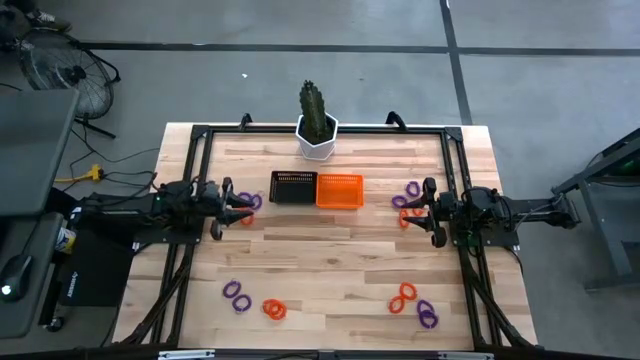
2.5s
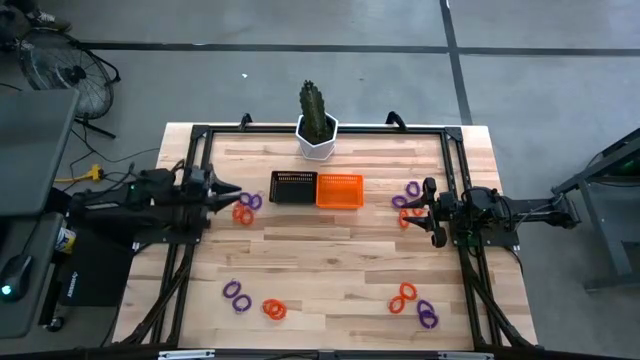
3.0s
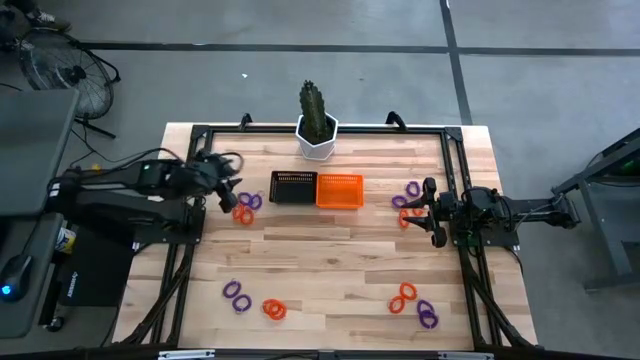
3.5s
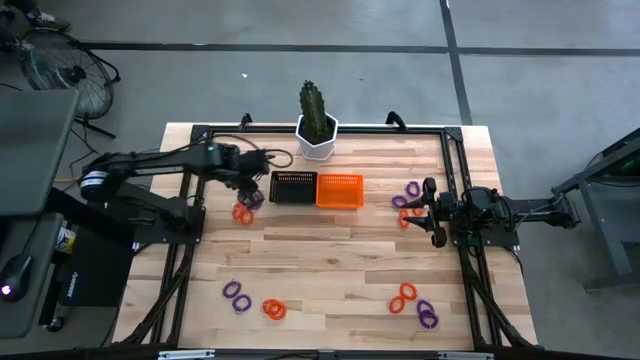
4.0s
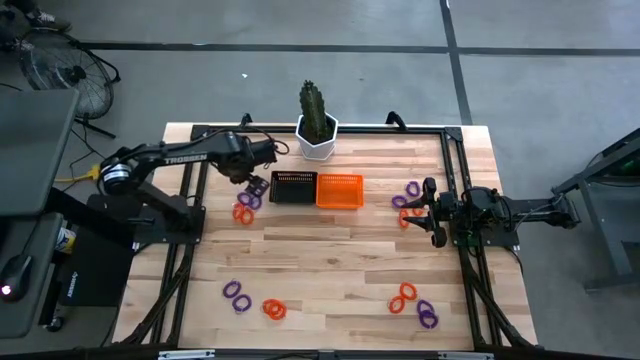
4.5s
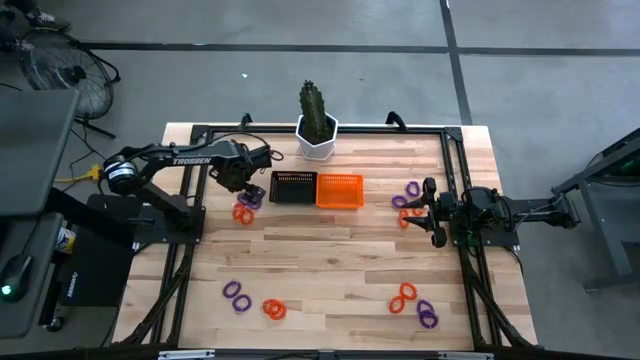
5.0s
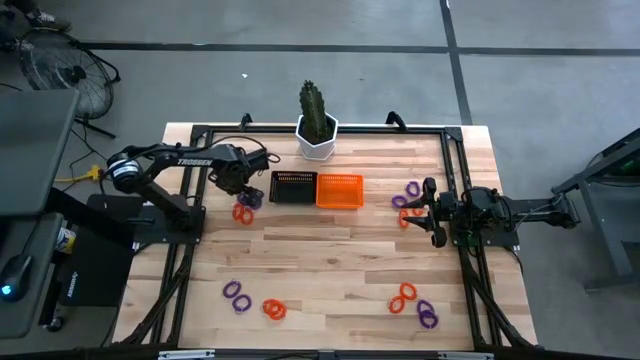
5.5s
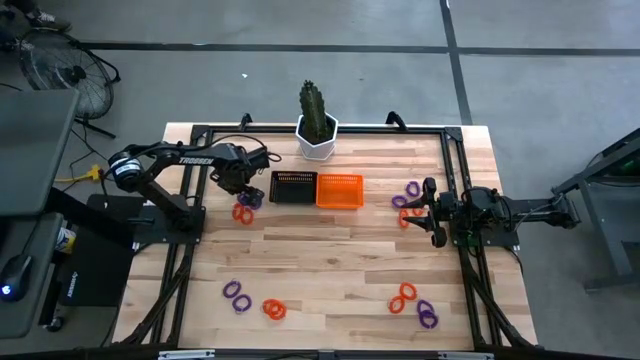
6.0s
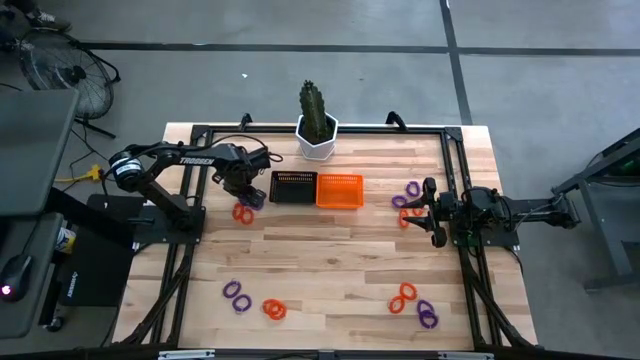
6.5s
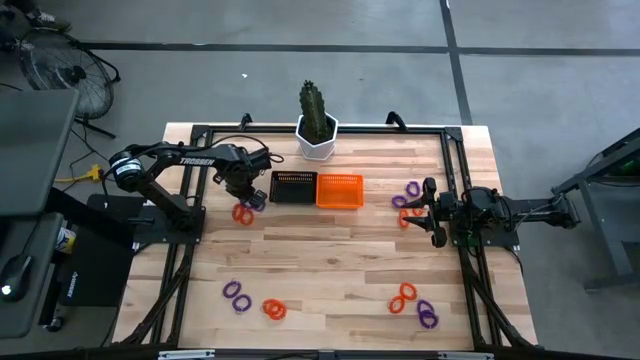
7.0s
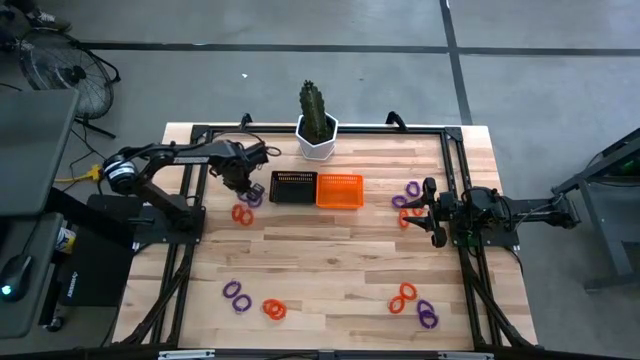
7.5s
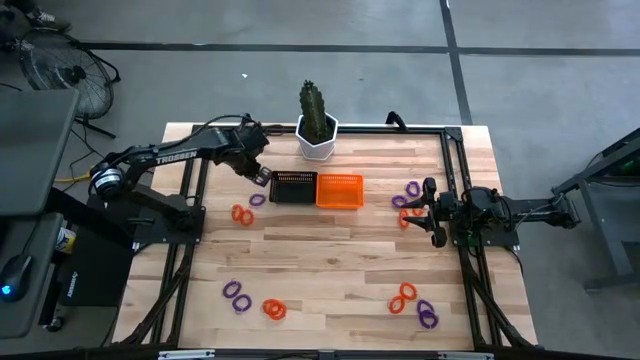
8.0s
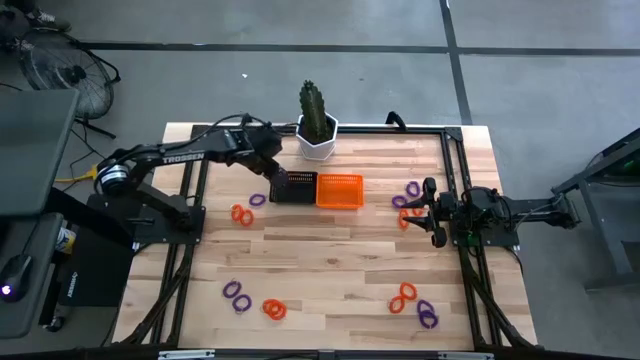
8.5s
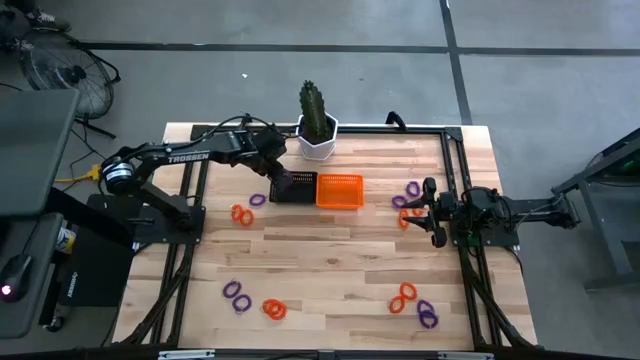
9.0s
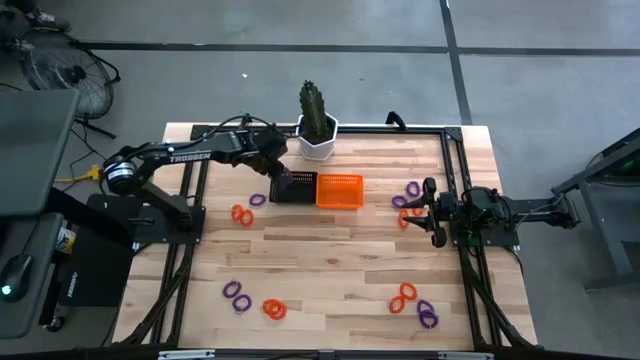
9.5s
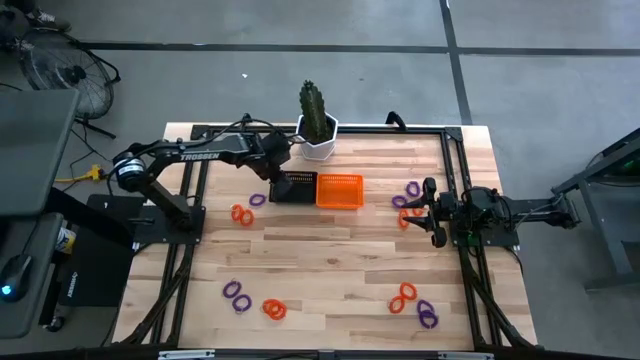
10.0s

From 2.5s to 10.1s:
Task: Sort spring keychains
Put the purple spring keychain in the black bin

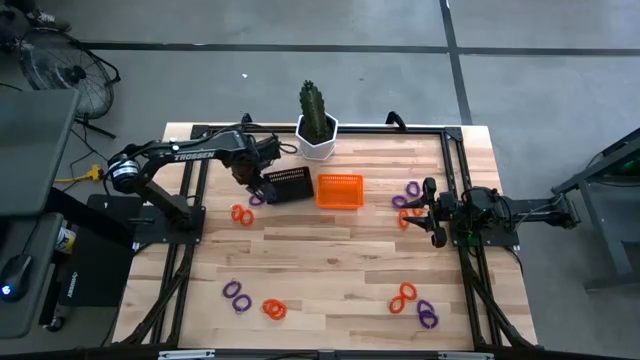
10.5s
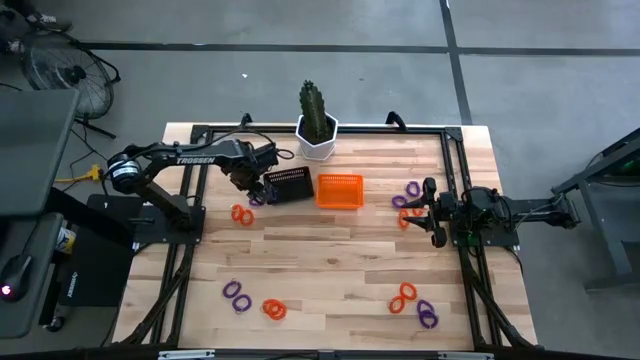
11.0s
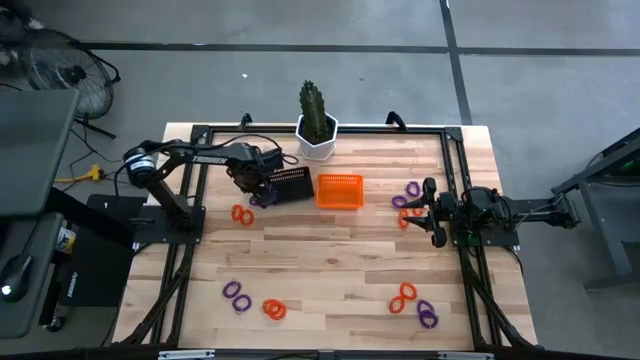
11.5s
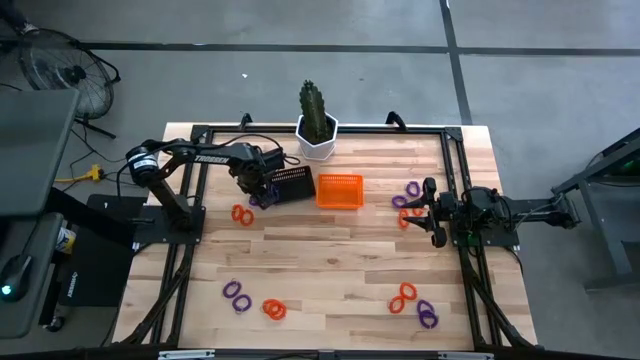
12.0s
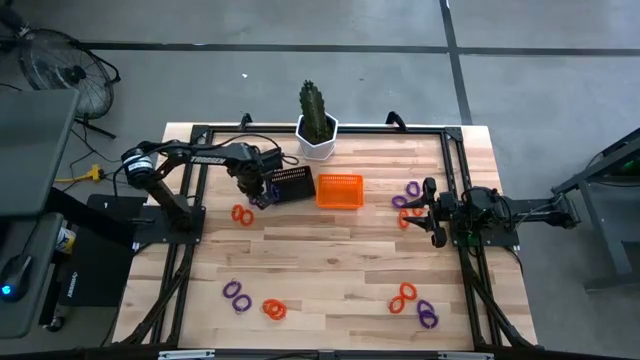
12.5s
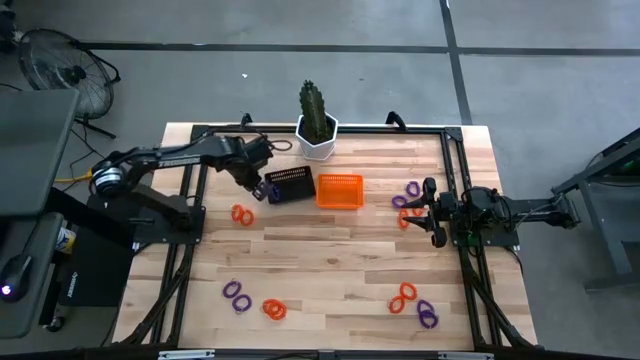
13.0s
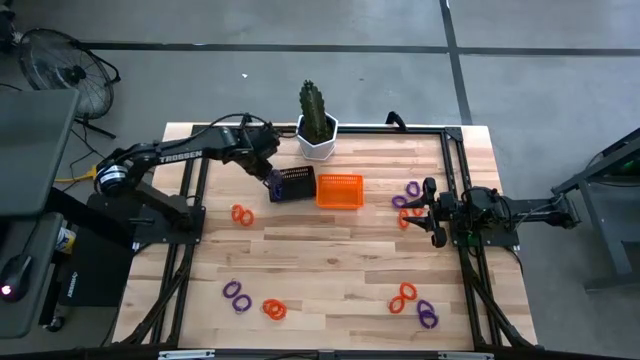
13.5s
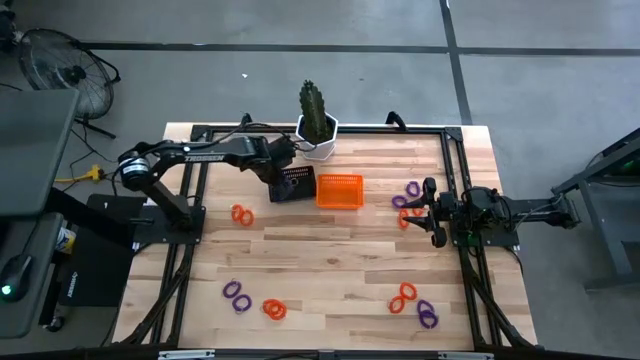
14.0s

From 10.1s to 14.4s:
Put the purple spring keychain in the black bin

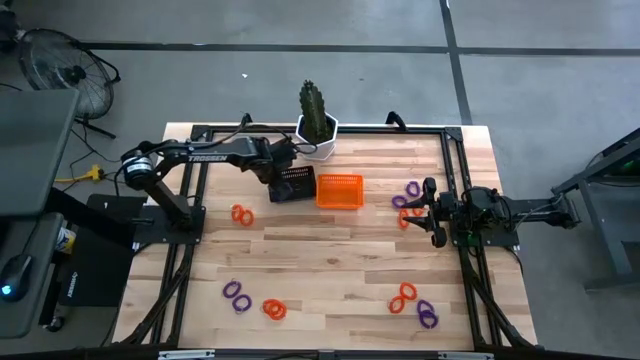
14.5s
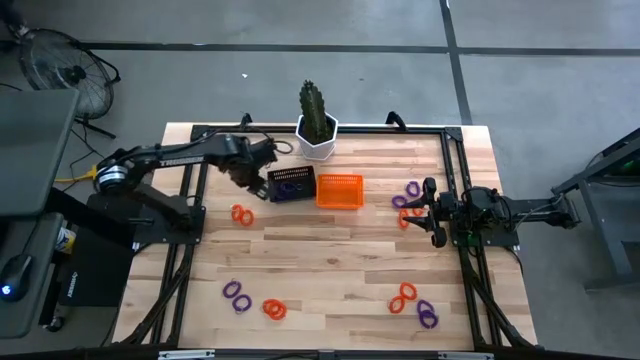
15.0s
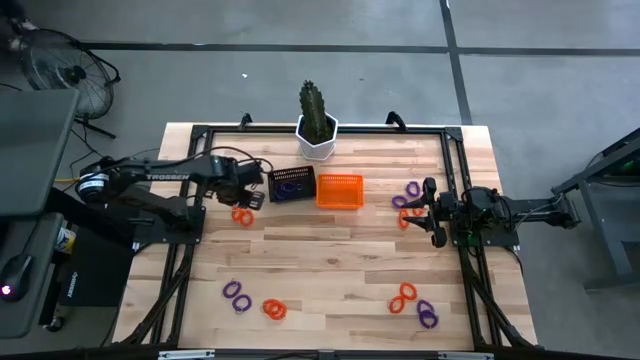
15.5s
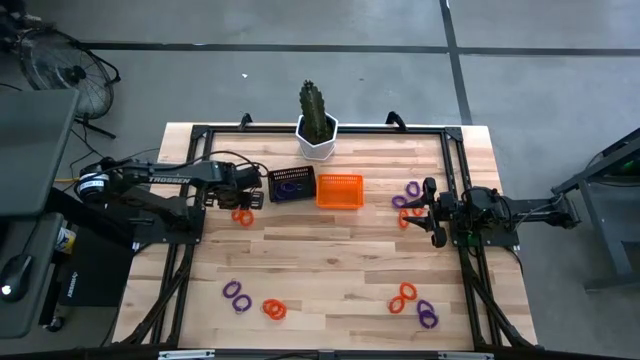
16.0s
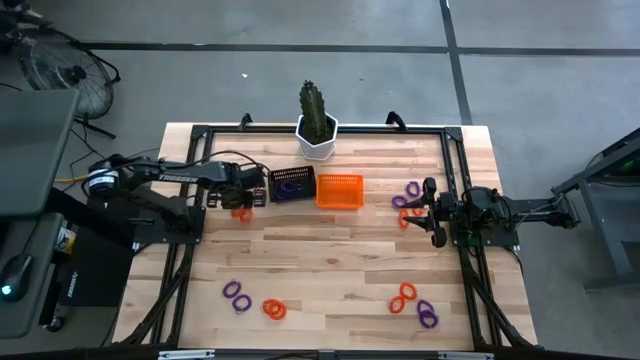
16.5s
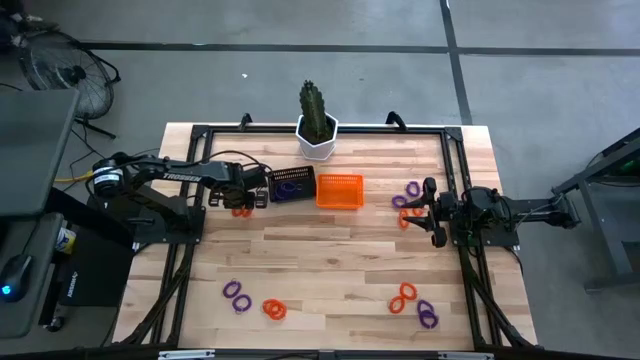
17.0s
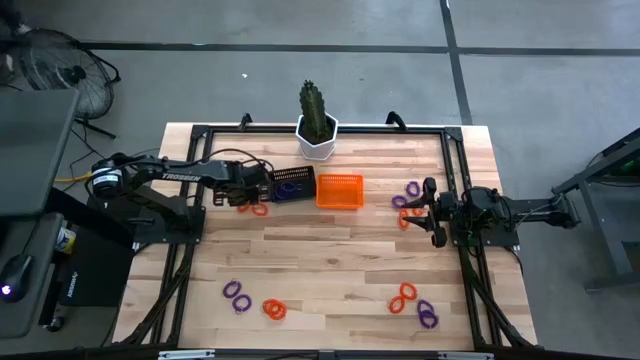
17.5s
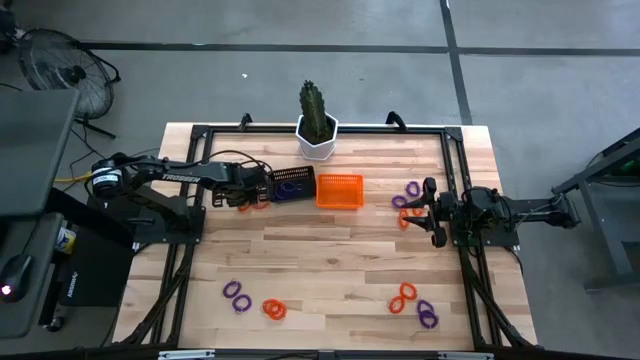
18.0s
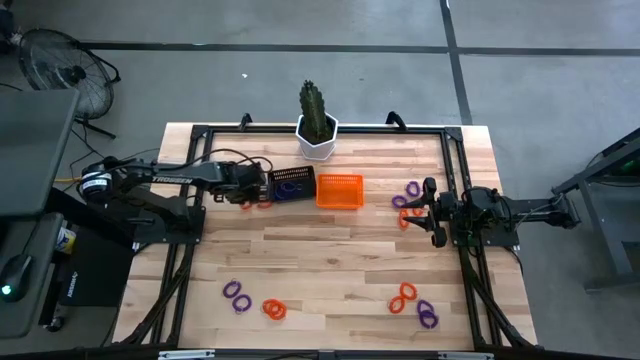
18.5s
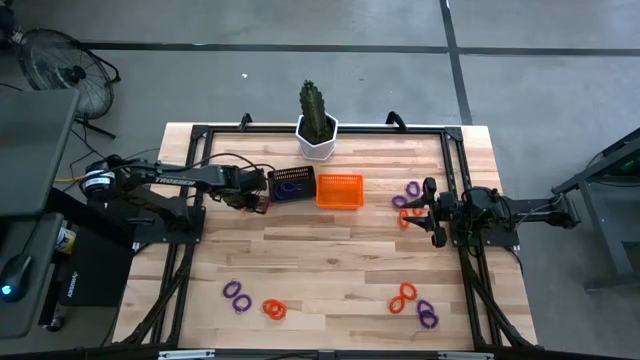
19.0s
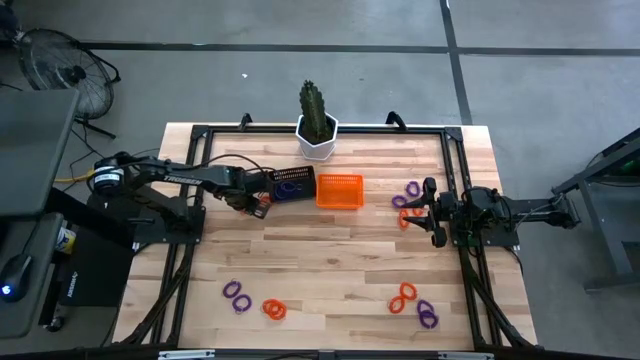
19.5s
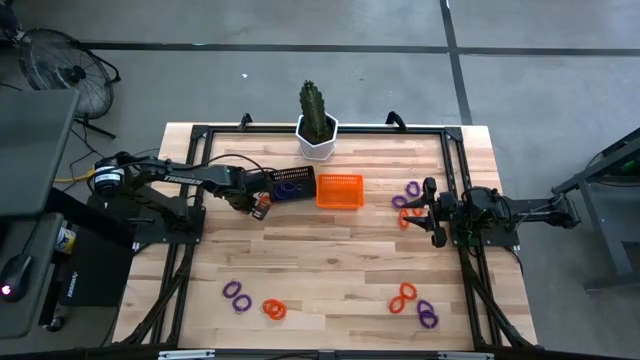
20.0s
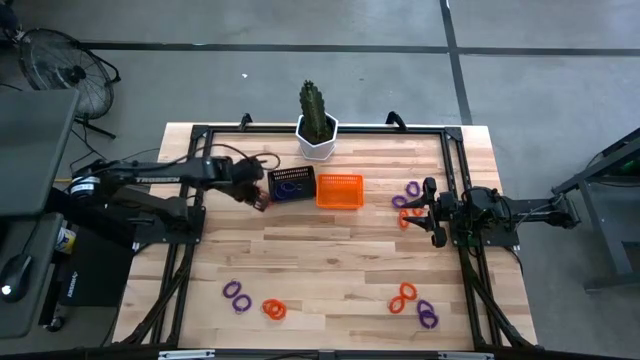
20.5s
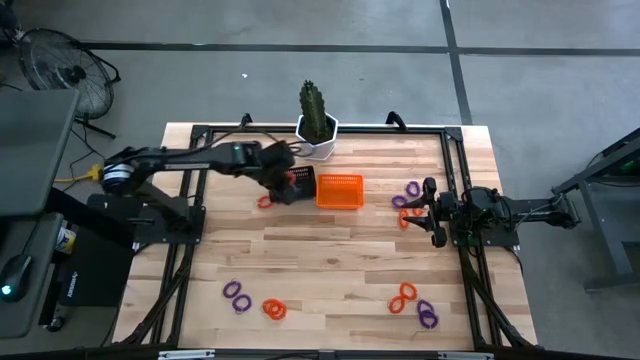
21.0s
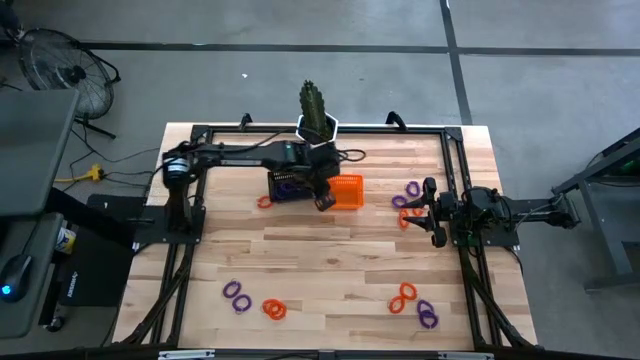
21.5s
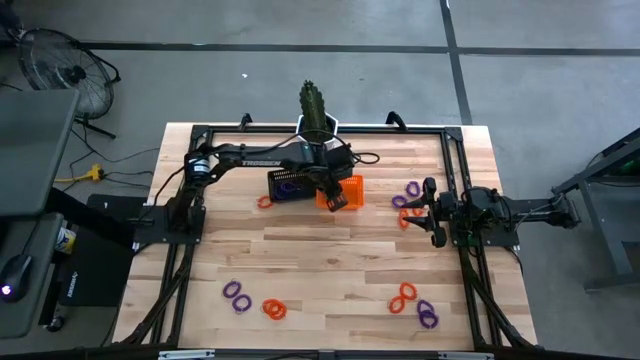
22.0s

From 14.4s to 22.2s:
Put the orange spring keychain in the orange bin
